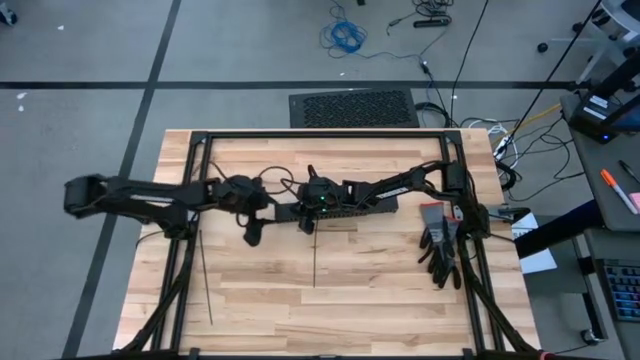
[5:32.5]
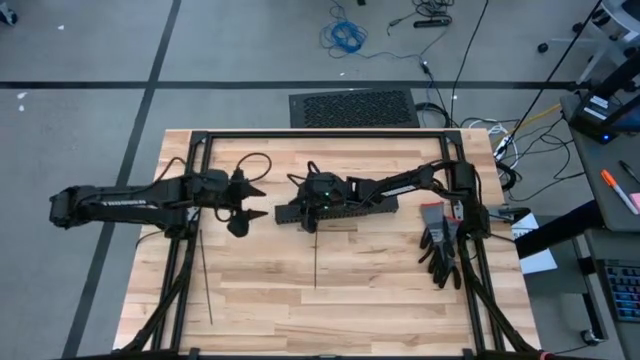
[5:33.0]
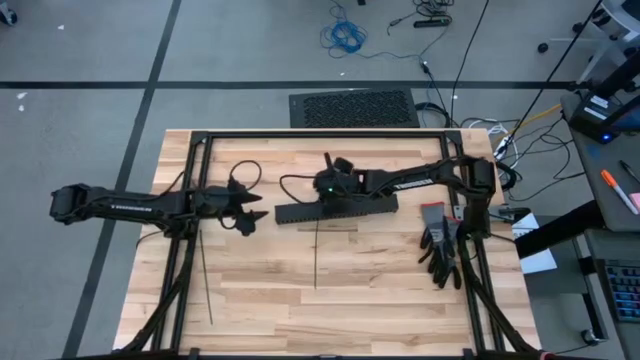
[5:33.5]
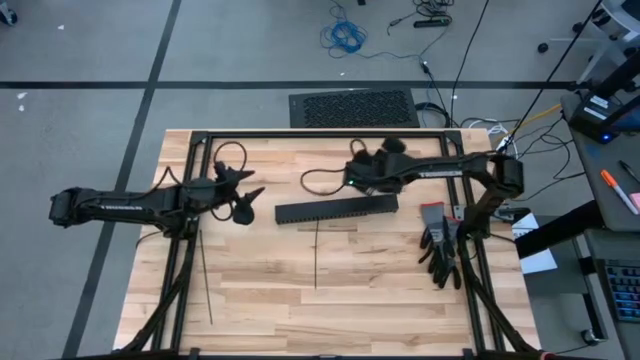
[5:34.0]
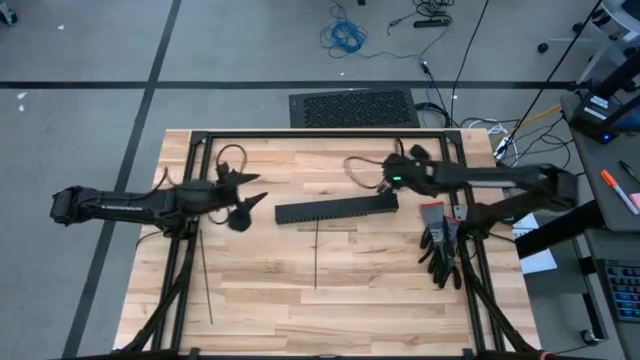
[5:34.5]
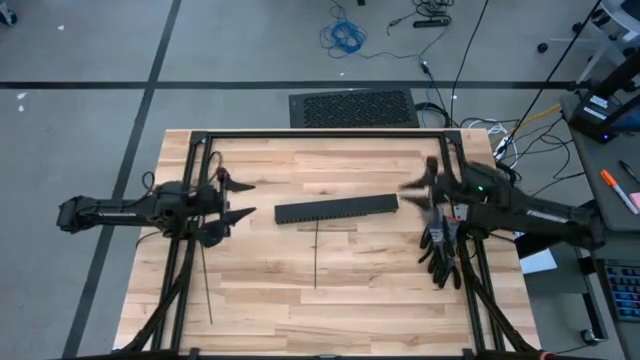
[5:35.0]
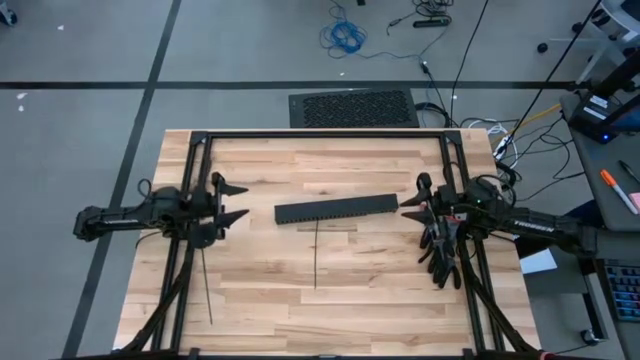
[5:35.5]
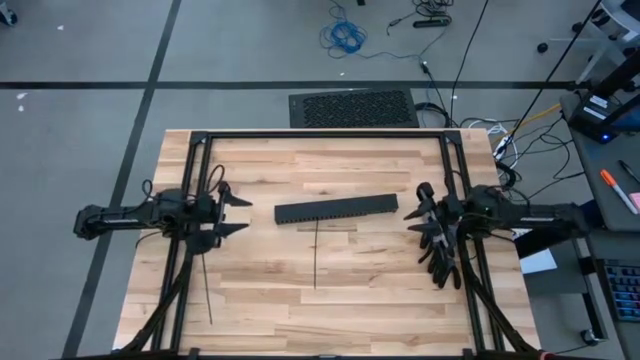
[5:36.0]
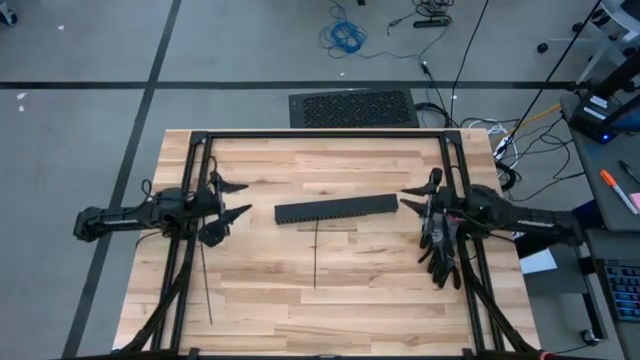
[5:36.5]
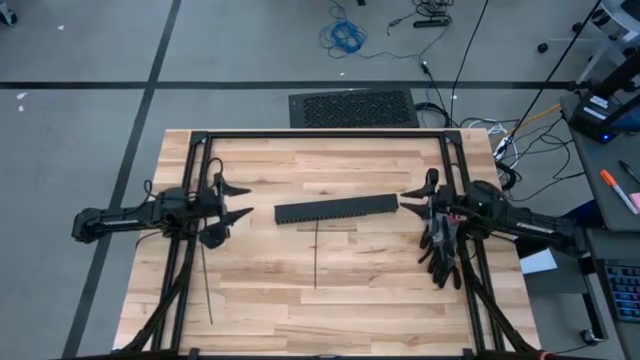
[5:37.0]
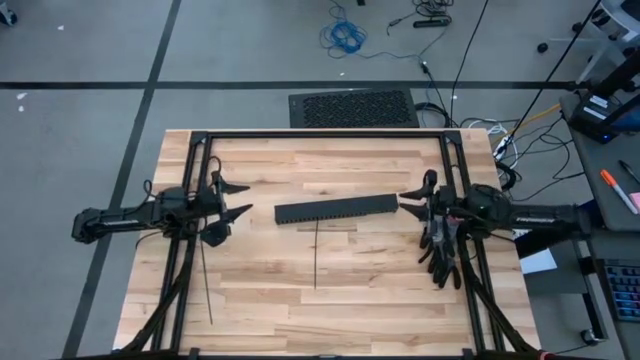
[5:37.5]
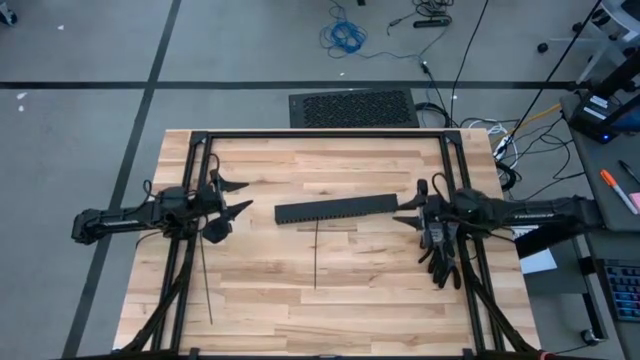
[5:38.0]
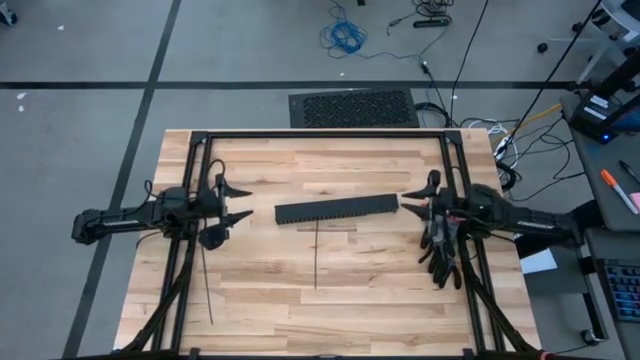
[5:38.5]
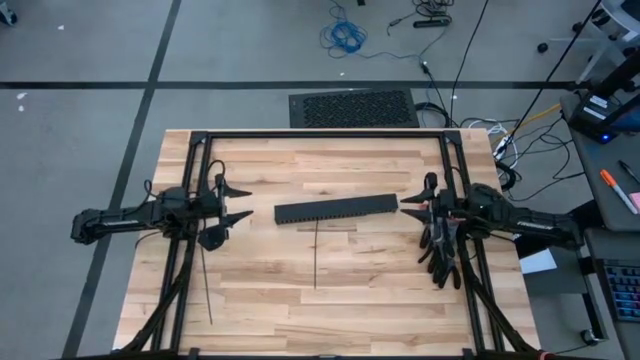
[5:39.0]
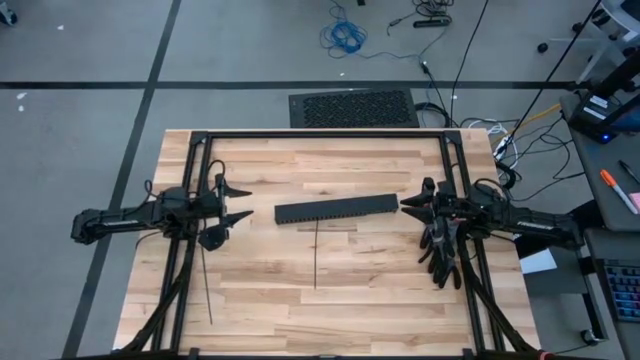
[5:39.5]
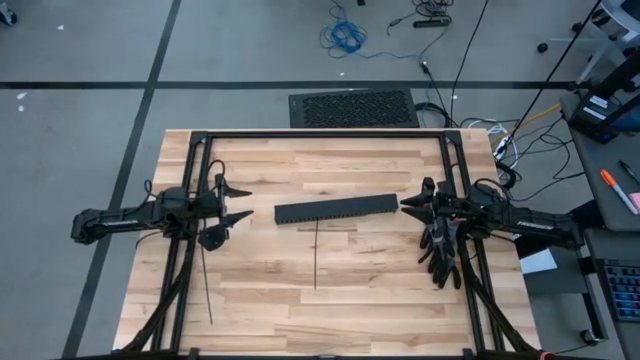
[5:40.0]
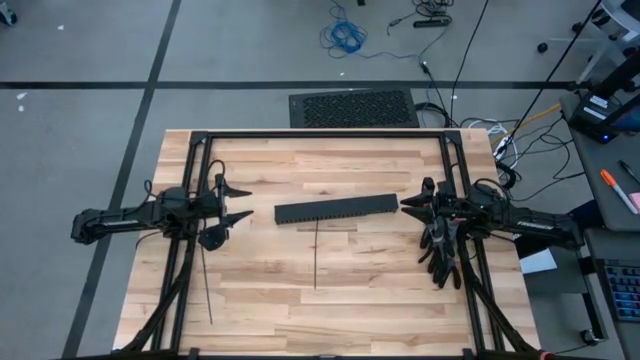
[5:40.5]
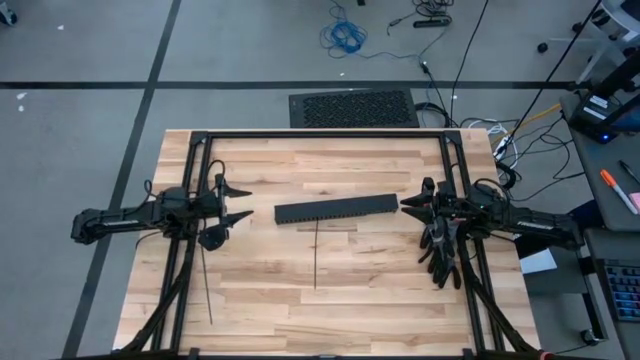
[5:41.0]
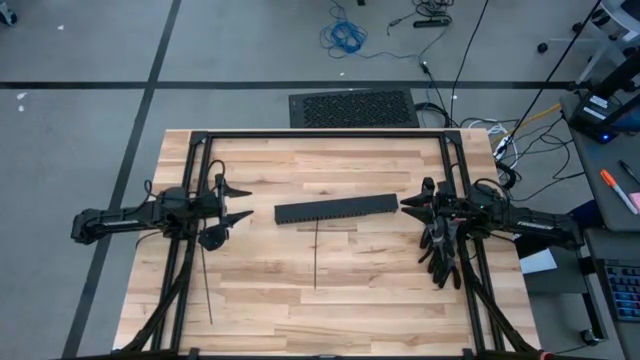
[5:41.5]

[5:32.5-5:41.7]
Task: Ziptie cables
Return to Home Position
